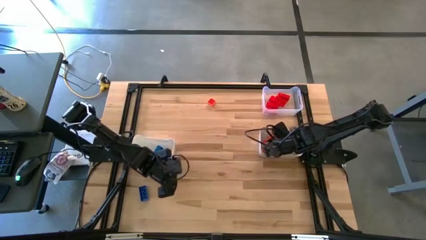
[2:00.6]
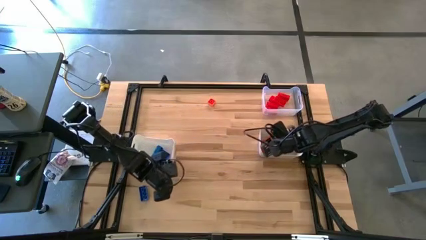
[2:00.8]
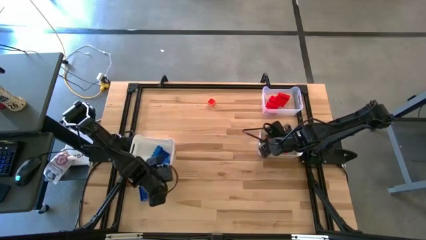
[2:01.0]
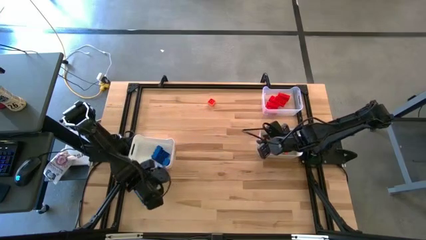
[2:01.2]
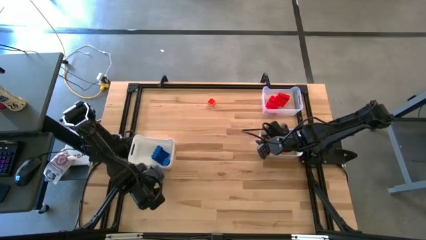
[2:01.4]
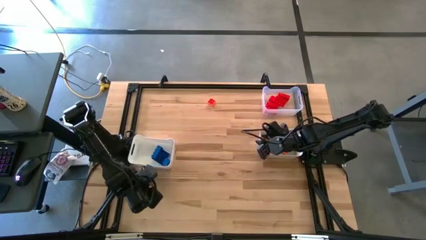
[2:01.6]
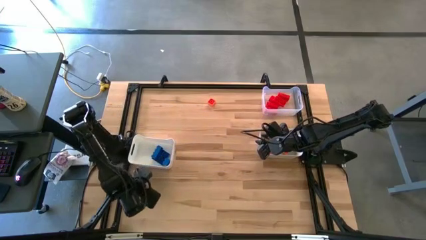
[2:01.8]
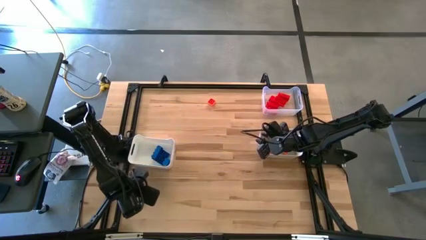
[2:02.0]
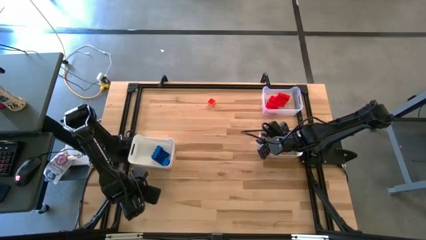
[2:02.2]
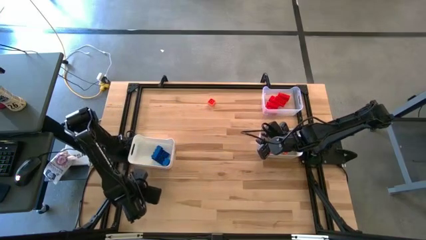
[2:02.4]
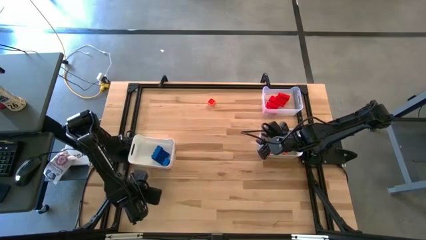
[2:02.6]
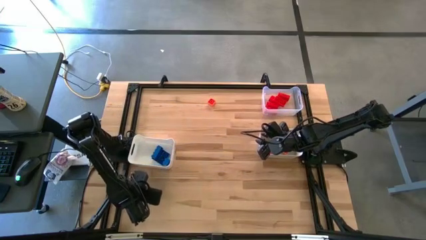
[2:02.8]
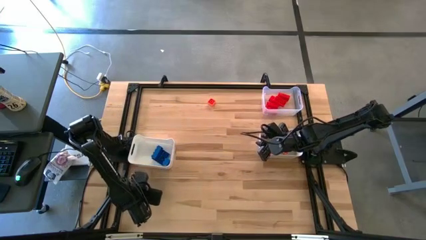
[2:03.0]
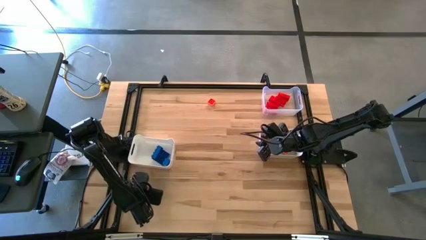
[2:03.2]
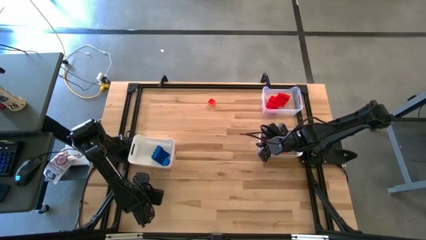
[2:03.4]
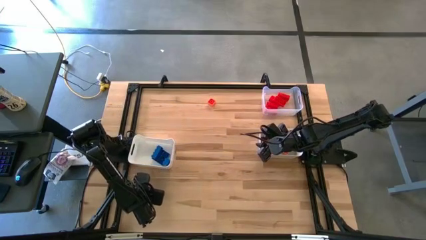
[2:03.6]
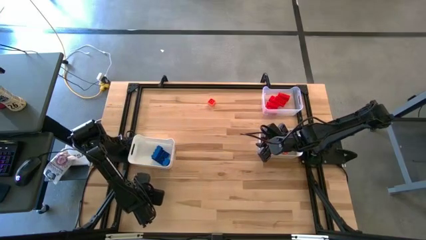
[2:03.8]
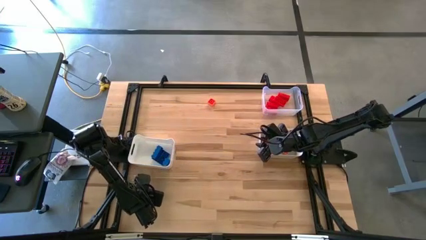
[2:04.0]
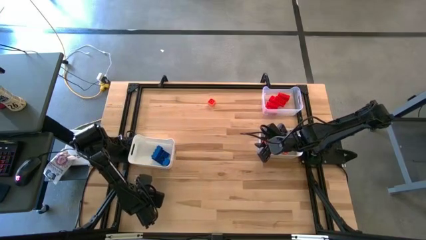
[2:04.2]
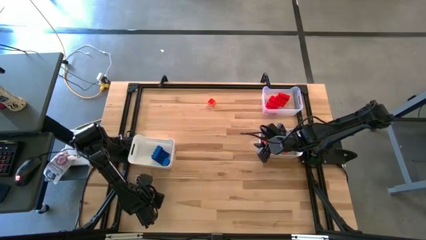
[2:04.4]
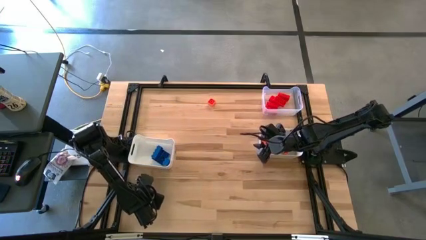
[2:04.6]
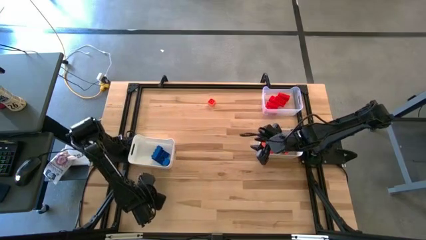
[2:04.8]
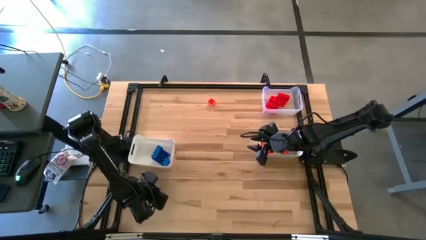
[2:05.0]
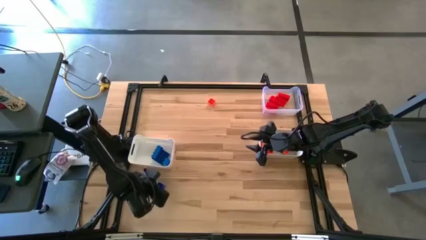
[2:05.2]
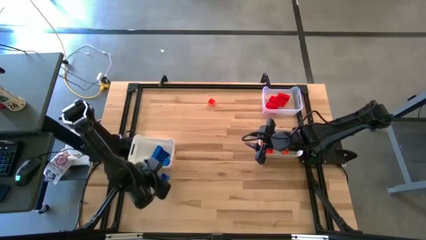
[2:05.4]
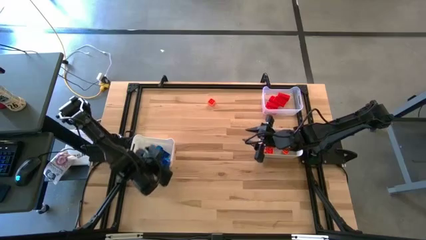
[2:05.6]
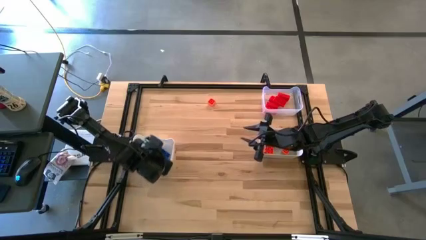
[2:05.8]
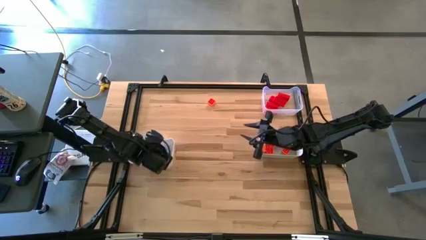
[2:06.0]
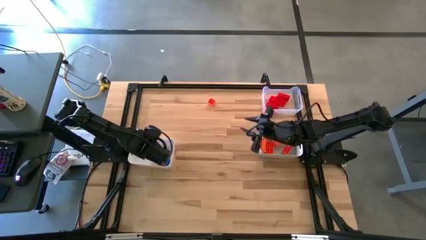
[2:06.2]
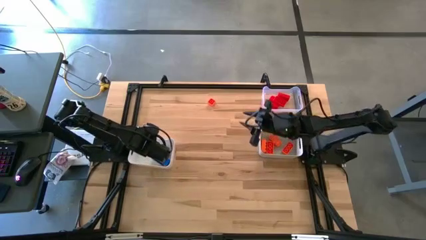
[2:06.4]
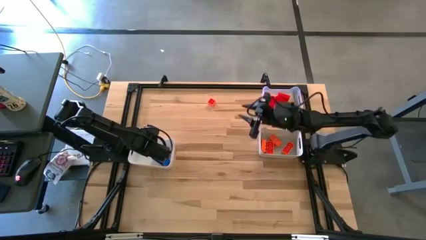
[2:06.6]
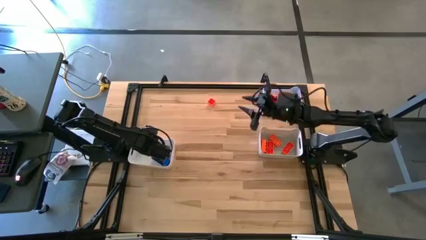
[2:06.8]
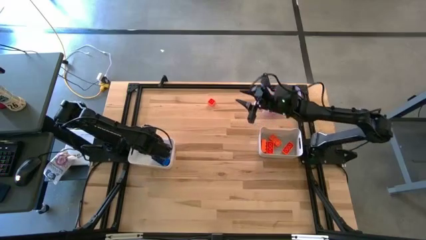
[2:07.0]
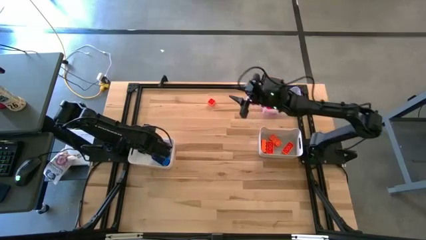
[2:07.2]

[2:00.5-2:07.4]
Task: Sort & place blocks by color
Put the blue game piece into the white bin

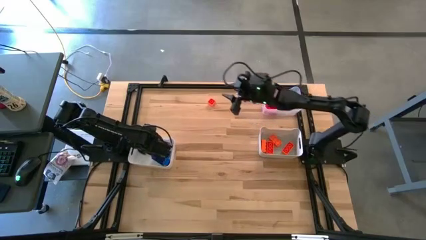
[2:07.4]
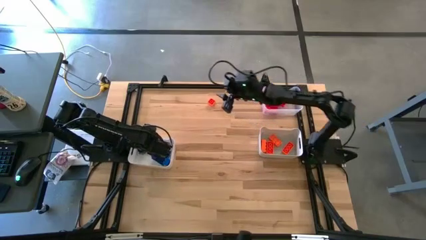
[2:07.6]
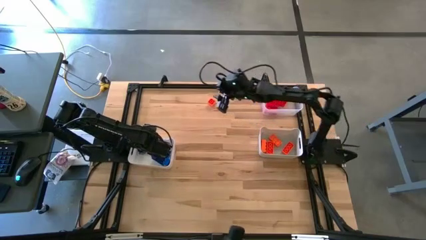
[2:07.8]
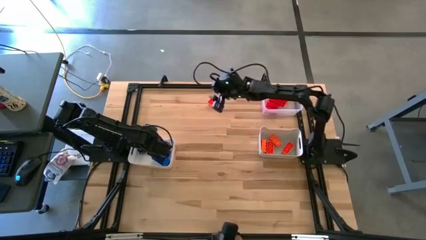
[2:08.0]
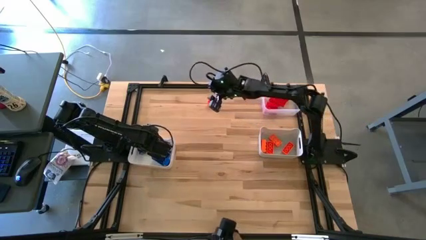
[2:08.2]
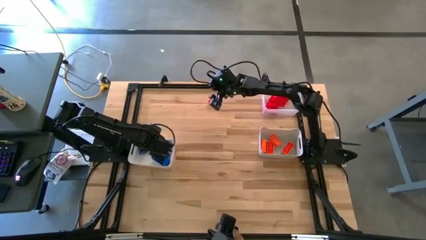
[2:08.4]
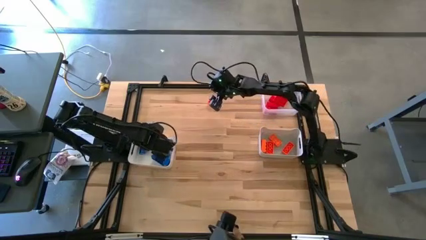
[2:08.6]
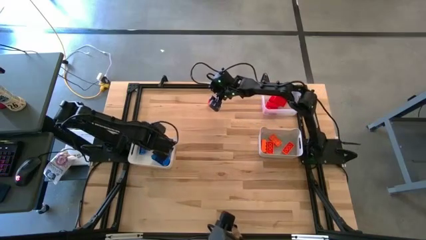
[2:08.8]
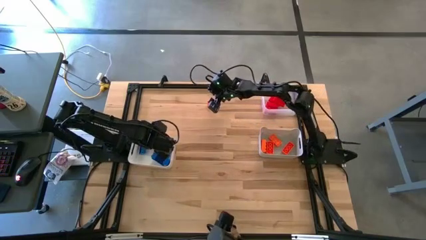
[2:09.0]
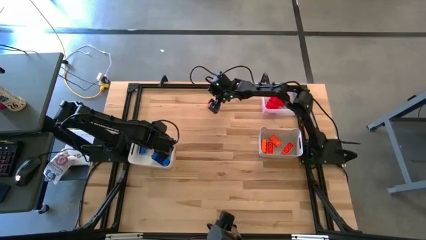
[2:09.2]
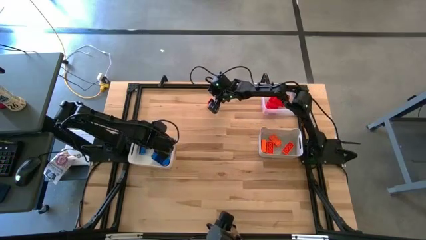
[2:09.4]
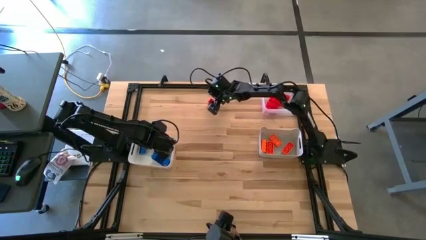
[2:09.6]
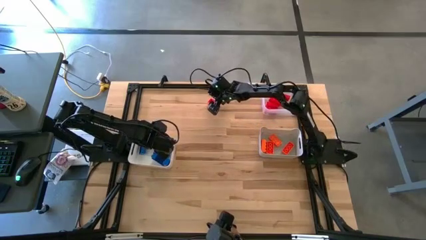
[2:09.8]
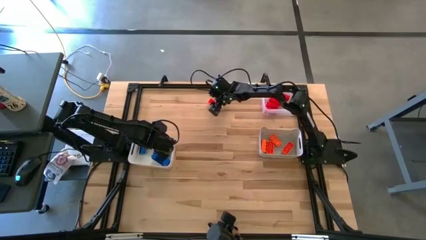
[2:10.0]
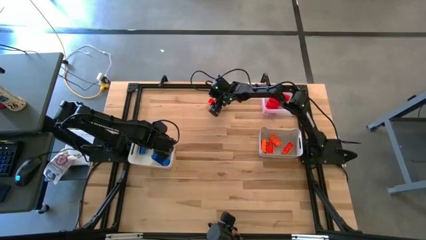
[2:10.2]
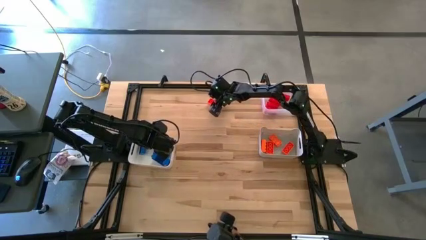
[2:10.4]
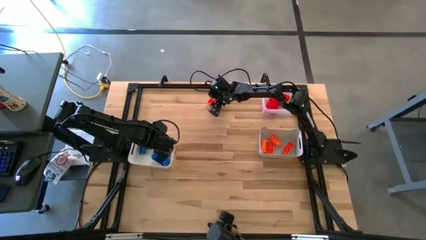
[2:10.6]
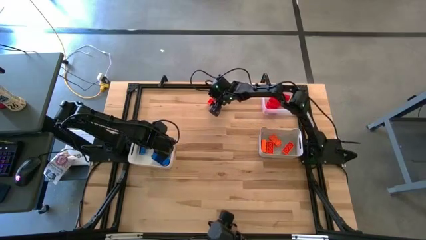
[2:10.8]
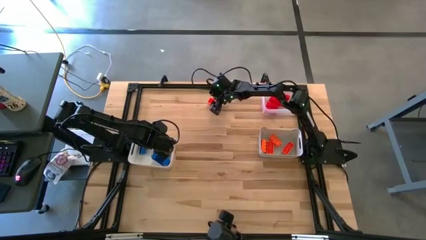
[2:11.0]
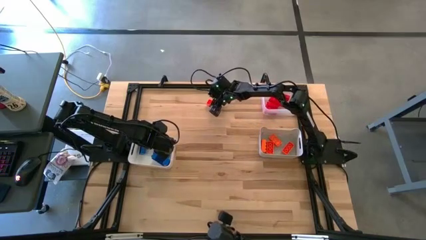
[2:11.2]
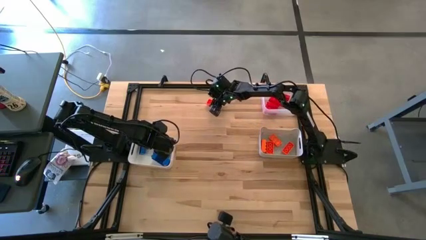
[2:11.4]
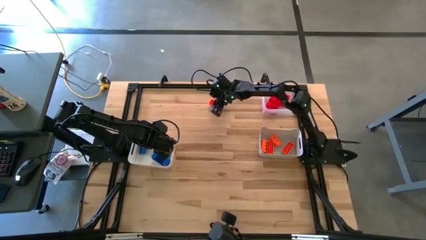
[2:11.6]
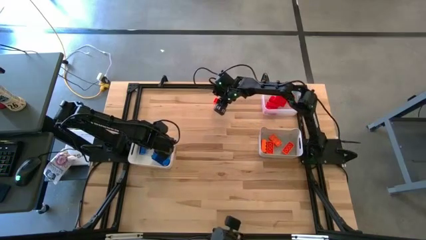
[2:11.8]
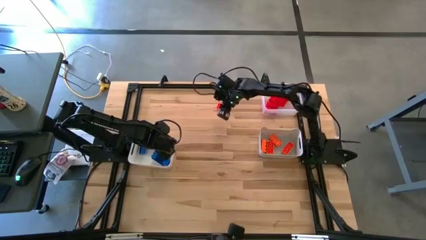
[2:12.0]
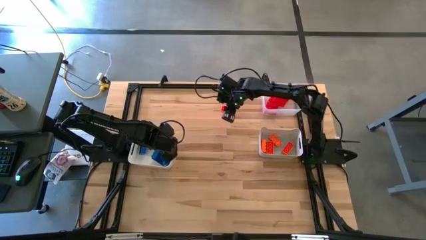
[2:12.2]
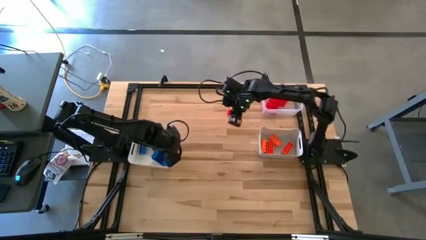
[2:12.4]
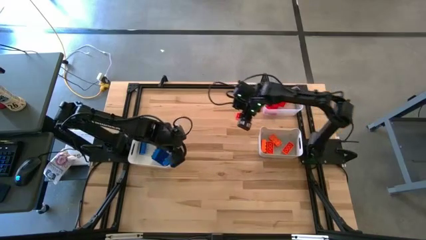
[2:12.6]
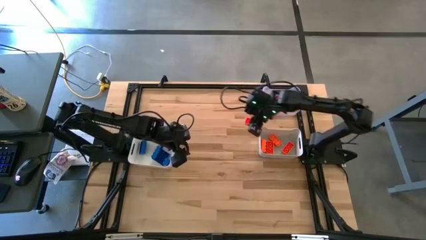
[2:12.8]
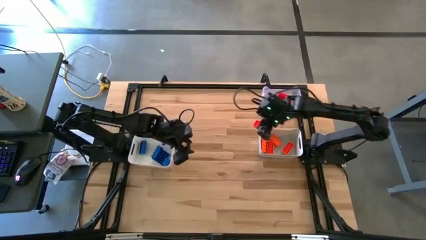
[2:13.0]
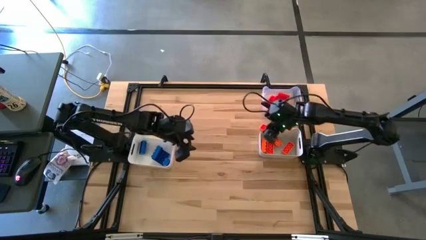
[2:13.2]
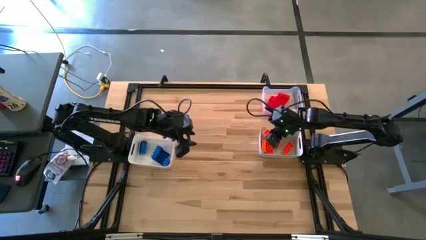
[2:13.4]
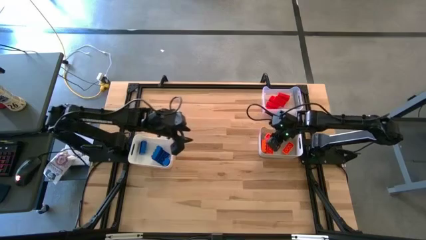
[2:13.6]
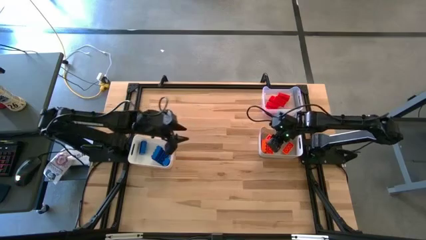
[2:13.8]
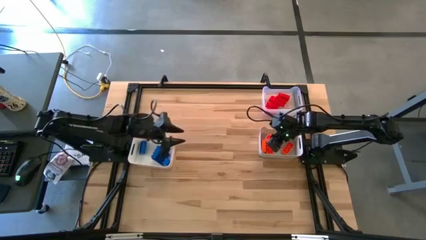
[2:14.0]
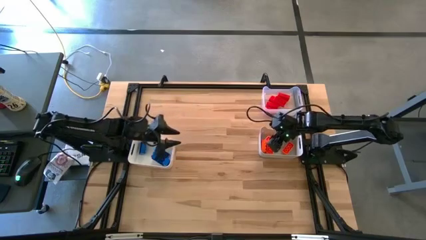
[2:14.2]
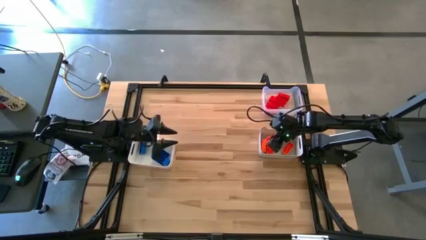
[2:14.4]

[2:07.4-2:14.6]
Put the orange game piece into the gray bin
